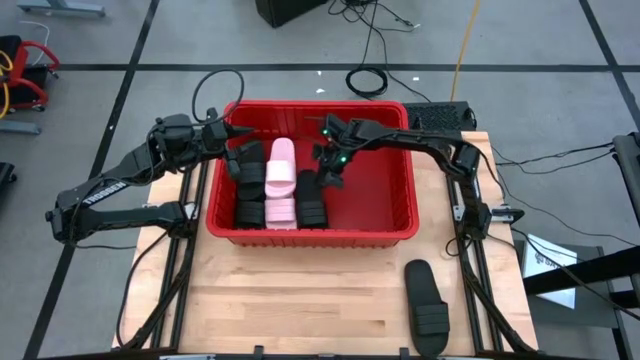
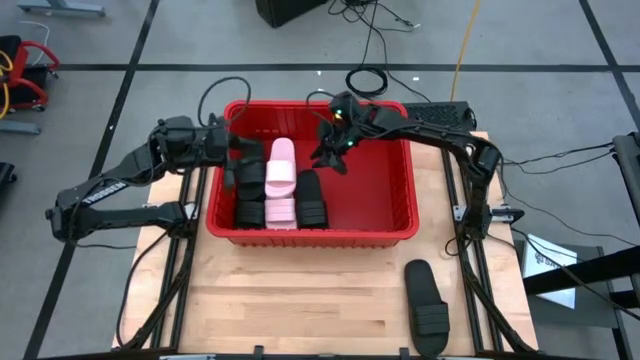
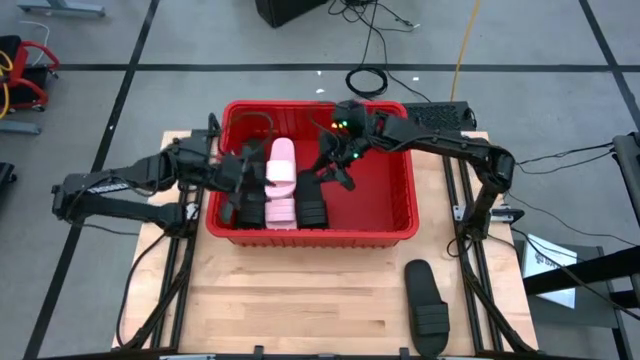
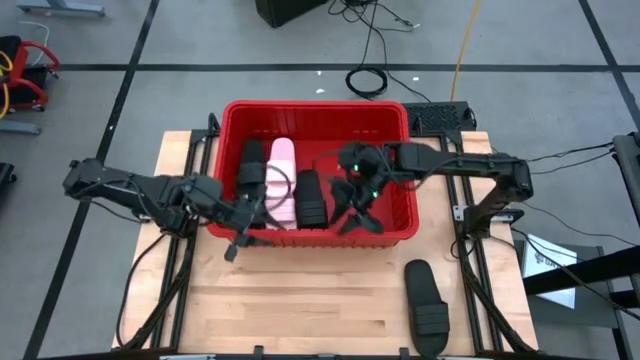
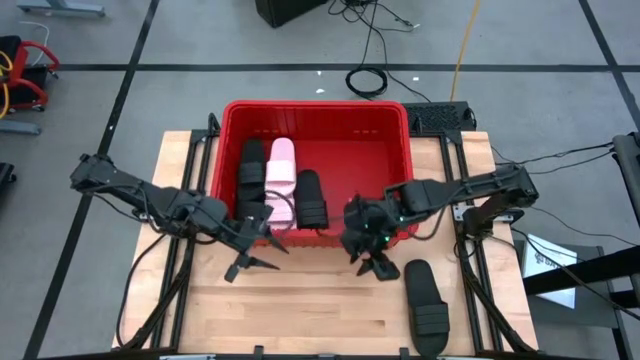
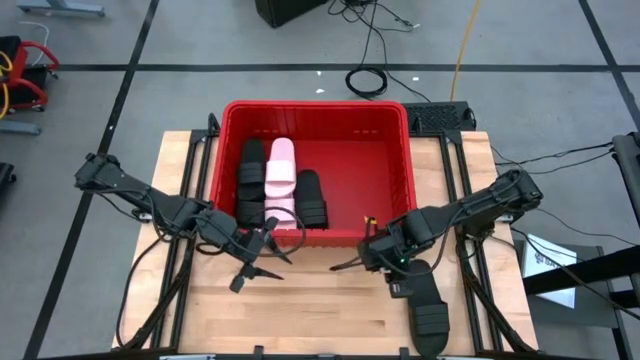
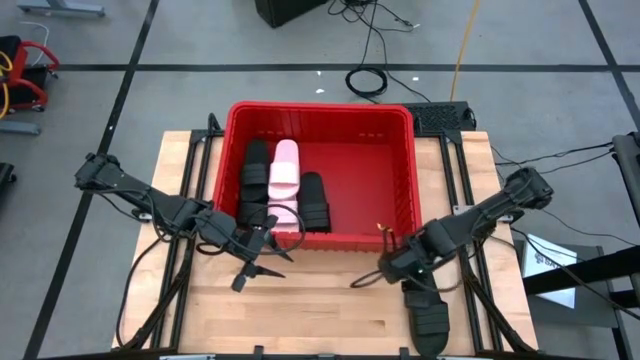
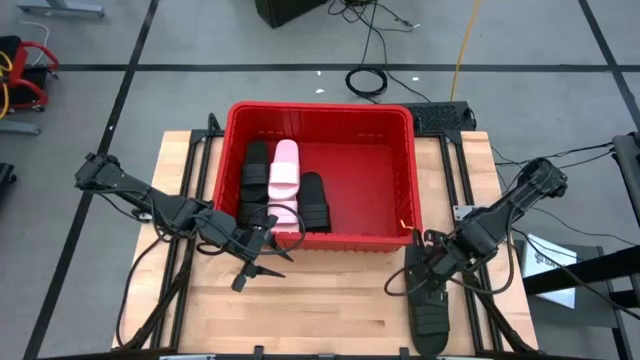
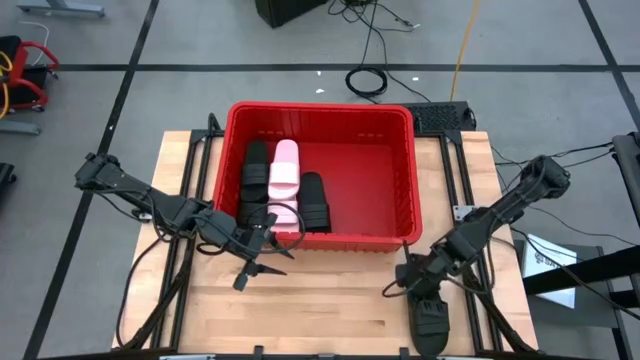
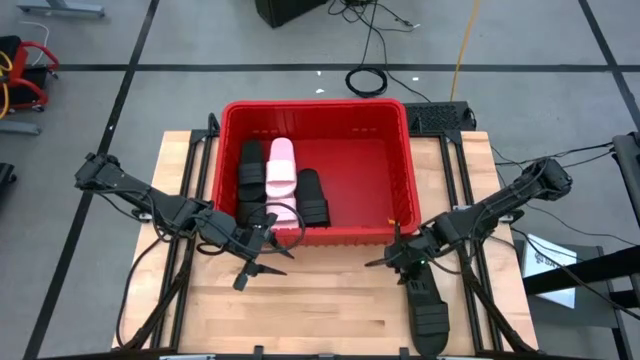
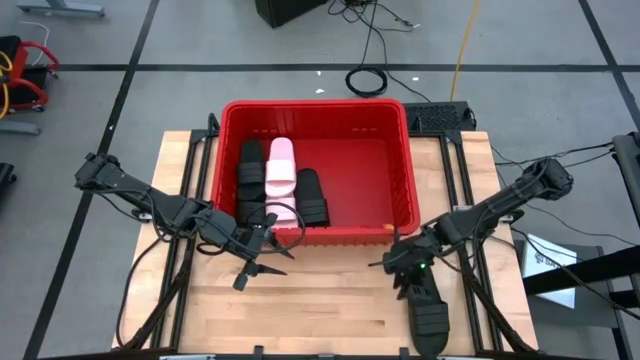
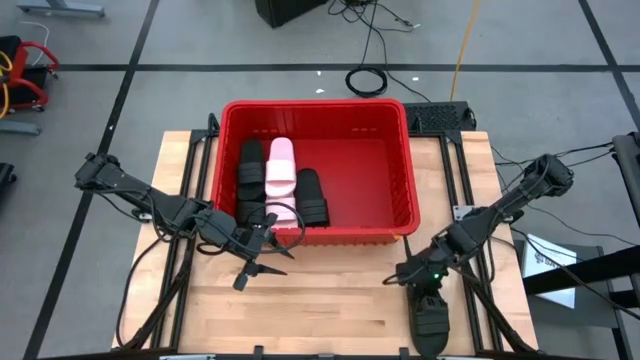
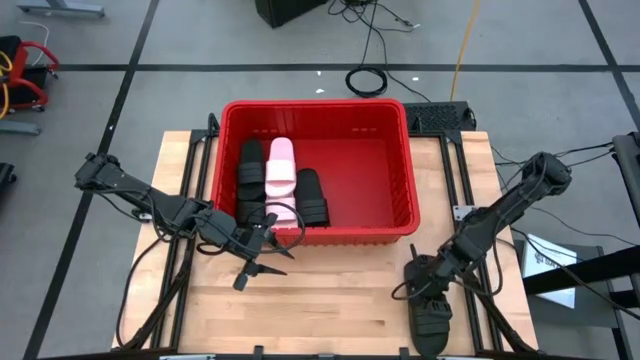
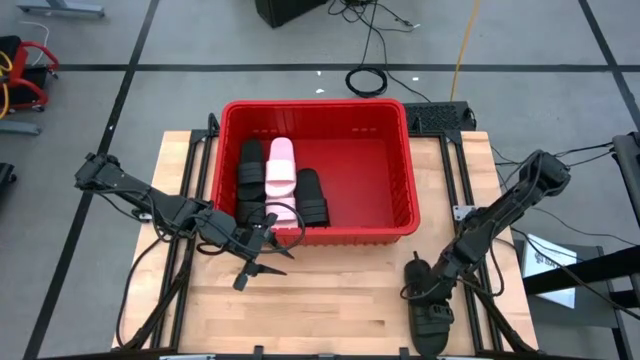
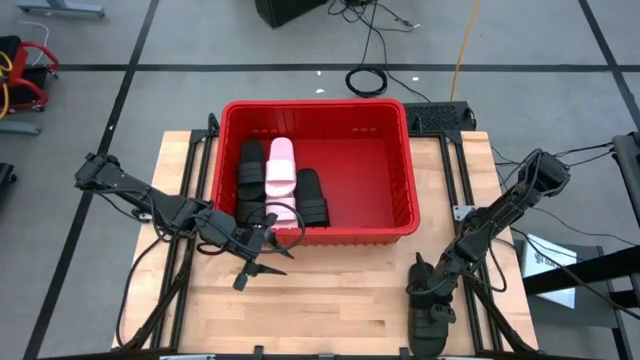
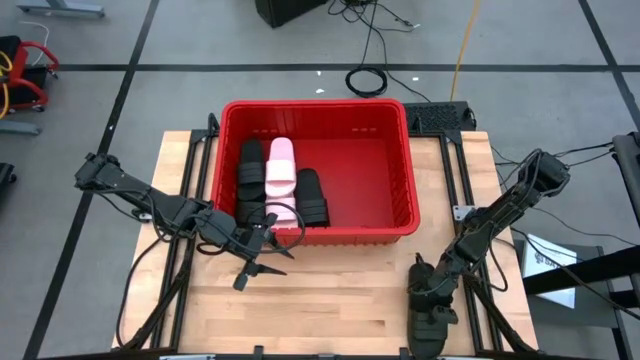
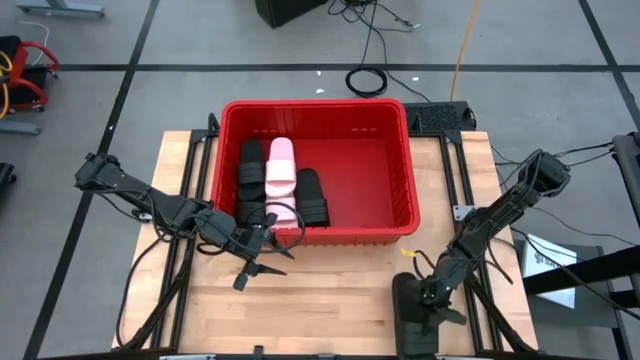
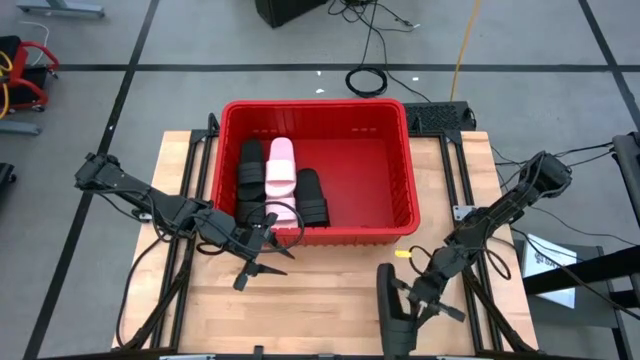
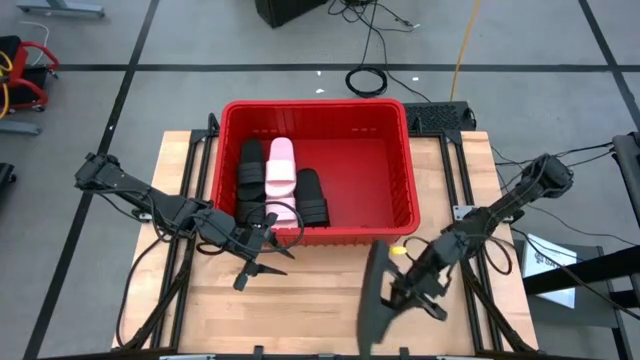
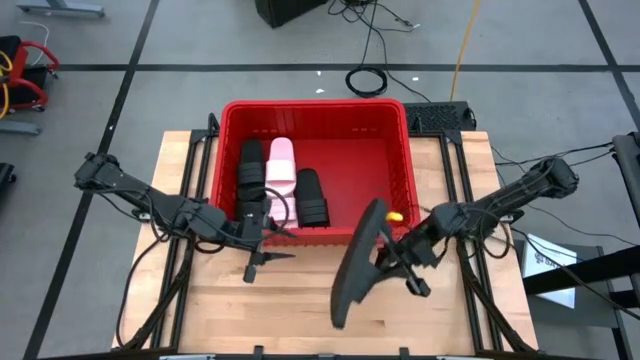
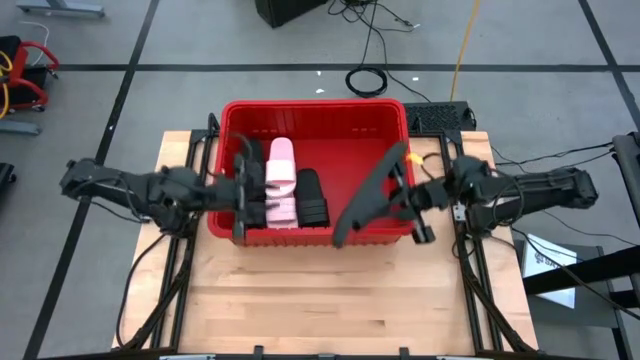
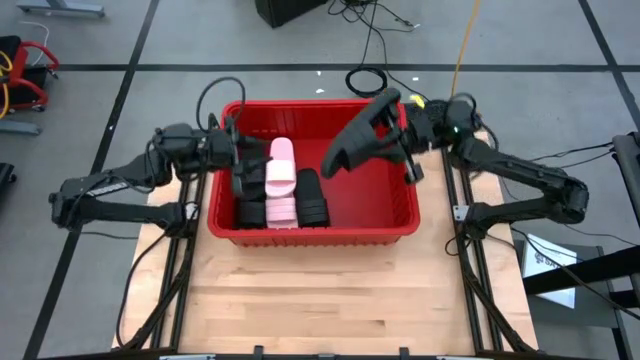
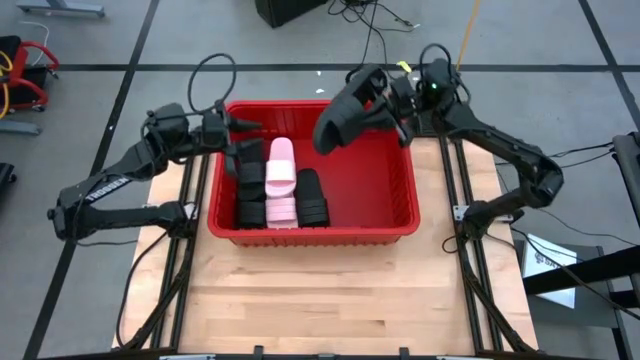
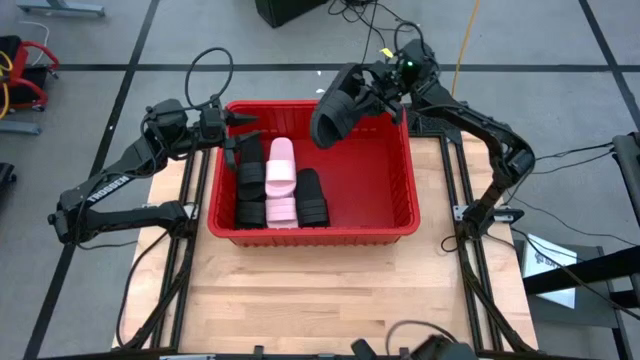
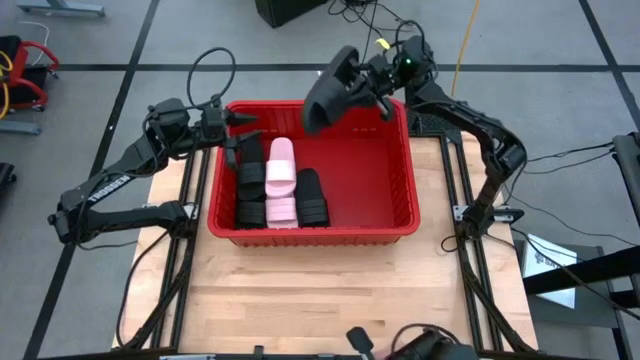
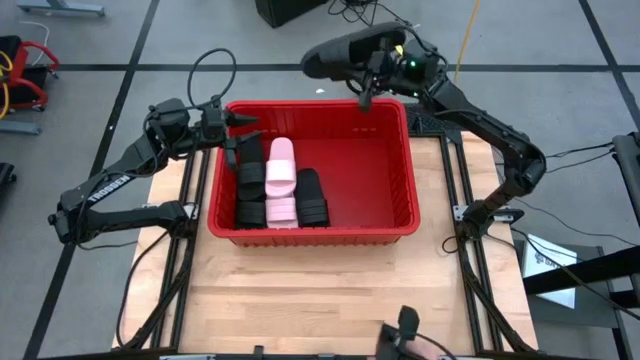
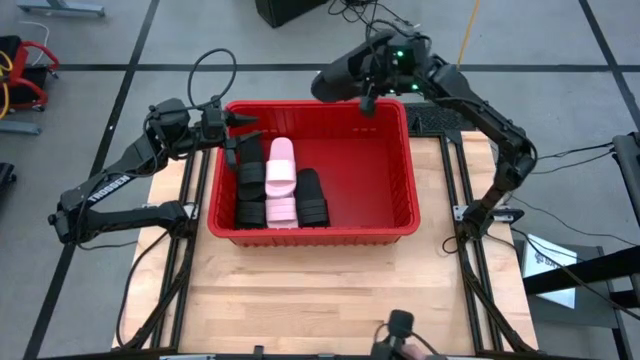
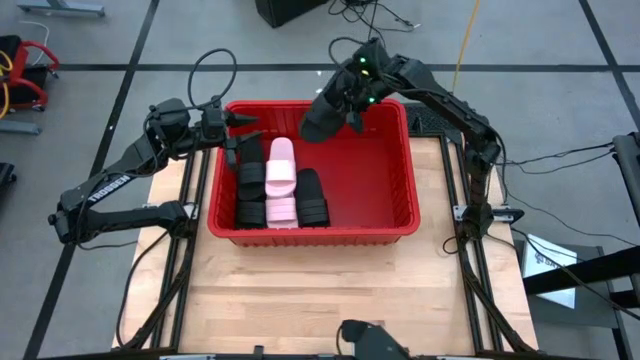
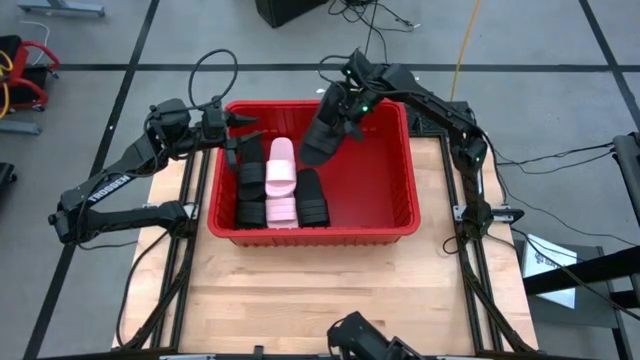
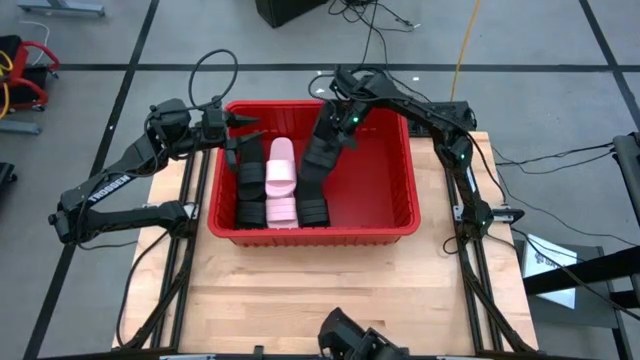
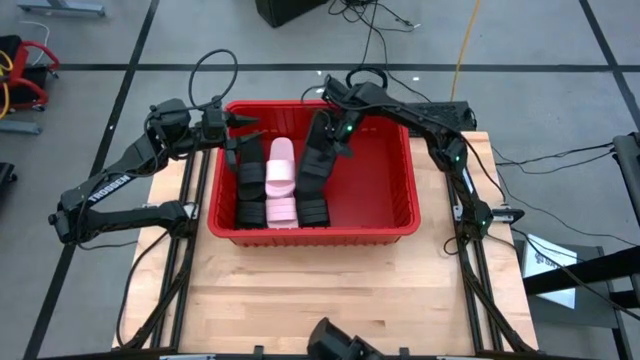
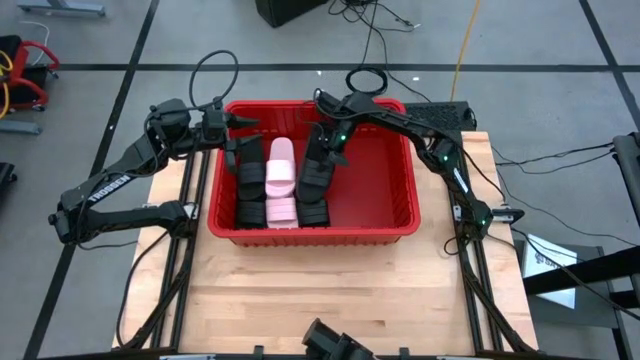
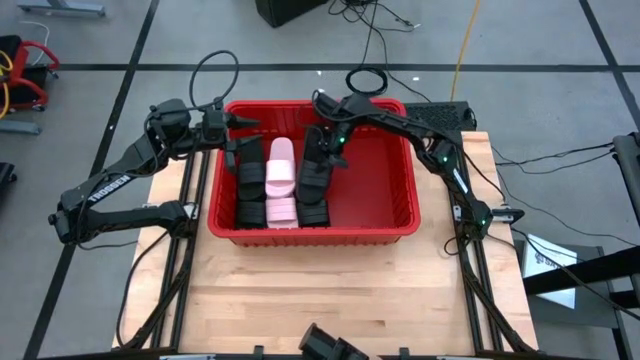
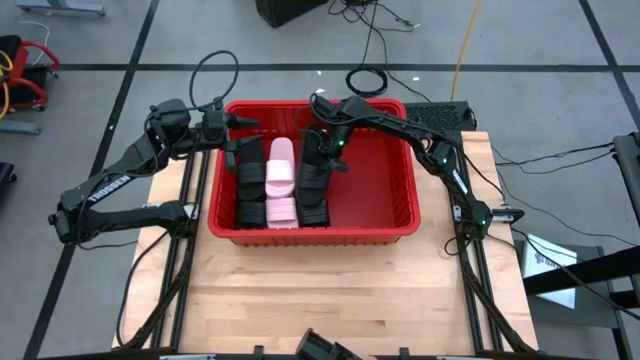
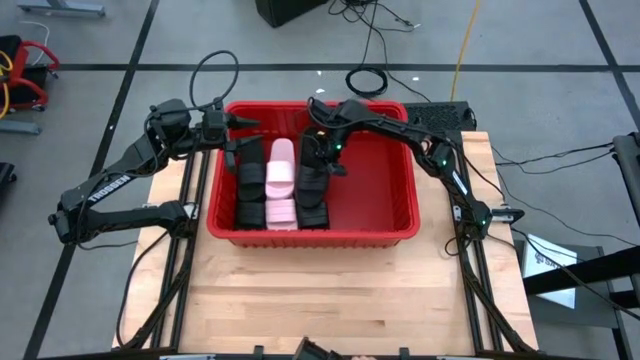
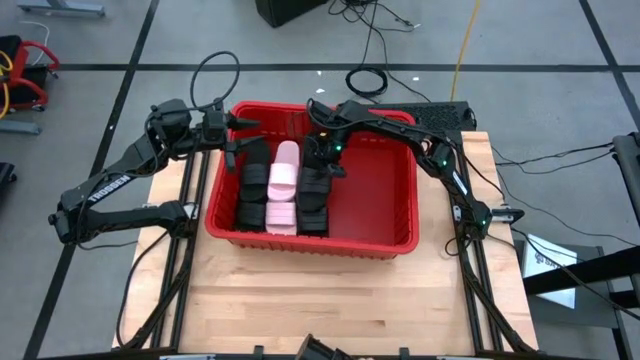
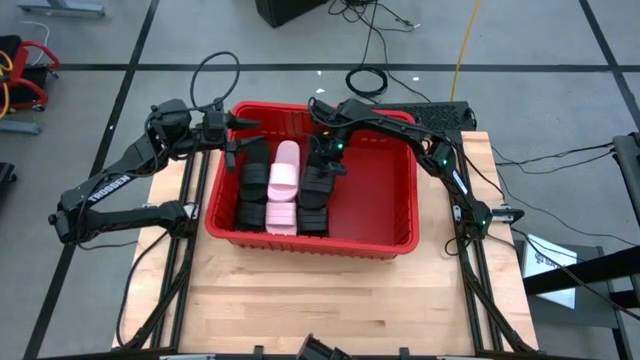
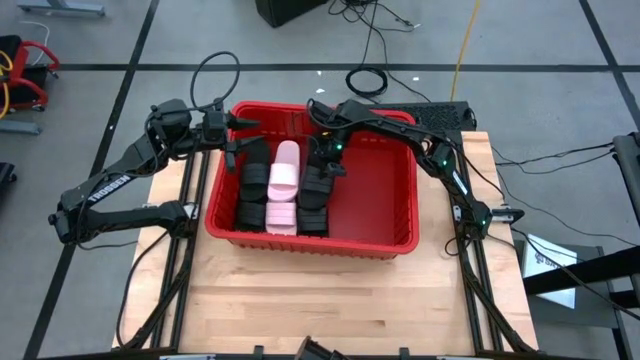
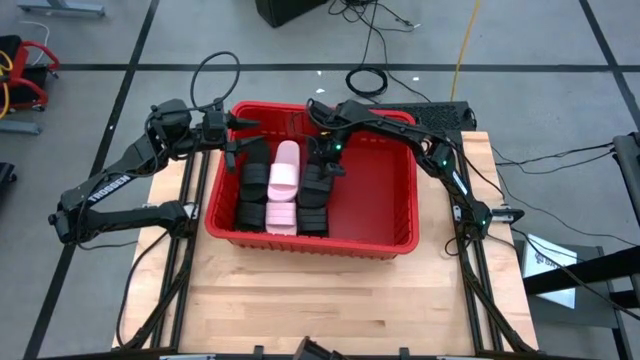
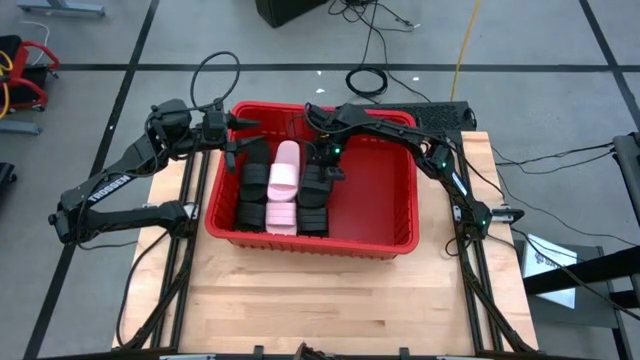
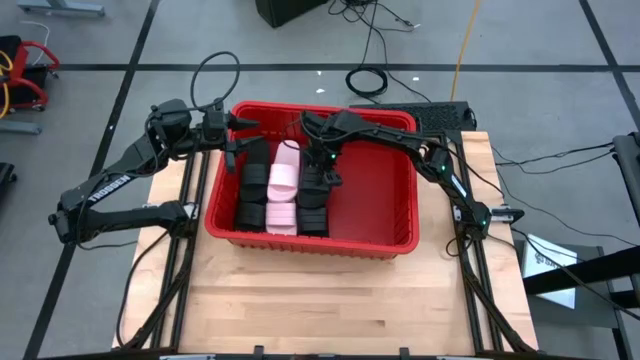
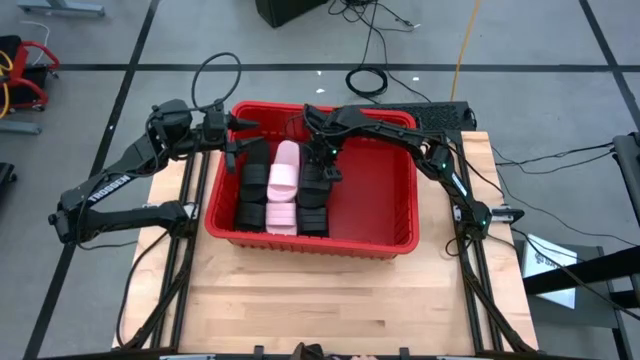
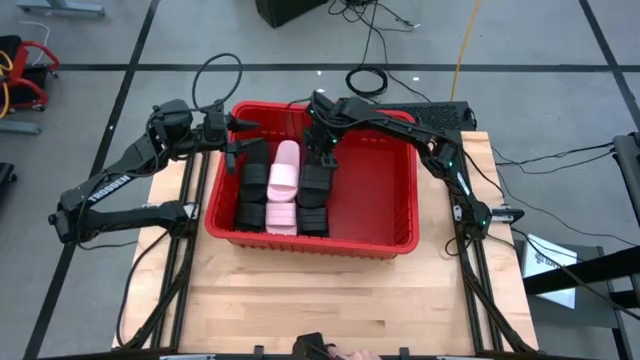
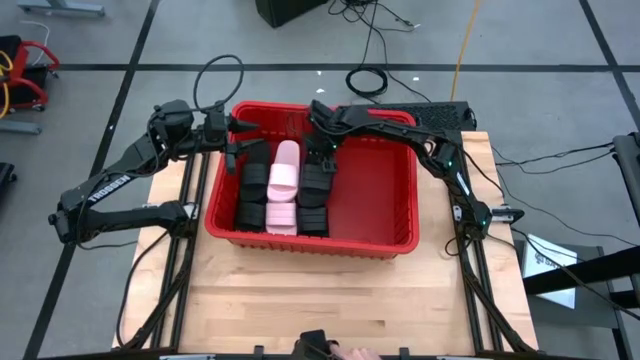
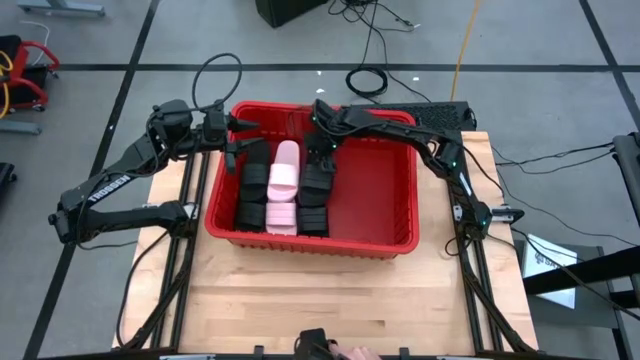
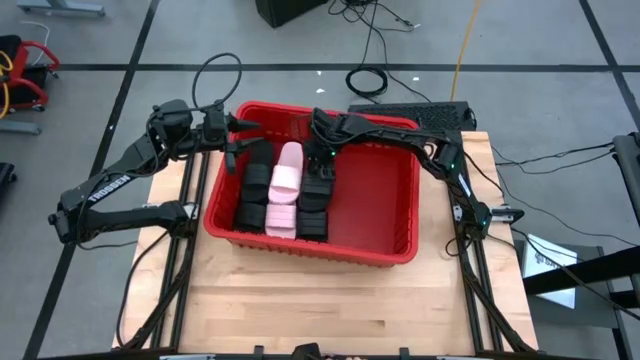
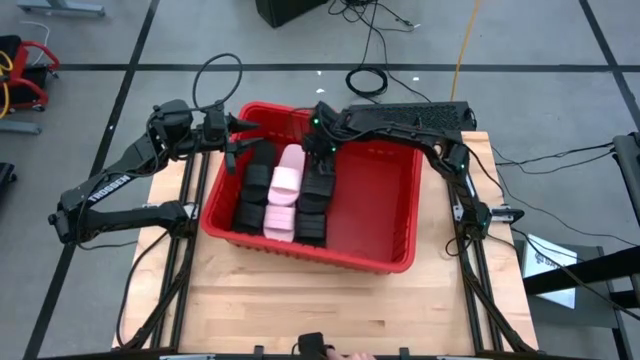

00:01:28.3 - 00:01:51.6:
Task: Pick and place slides into bin
Put the black slipper into the red bin
